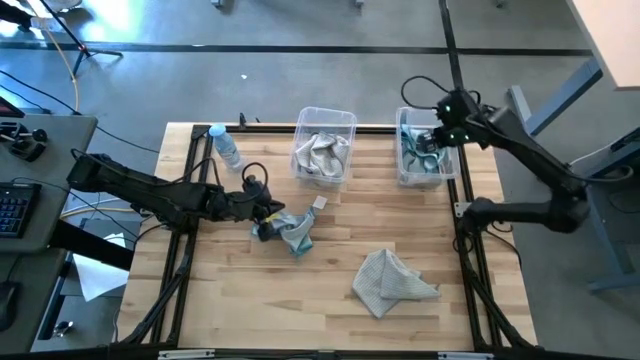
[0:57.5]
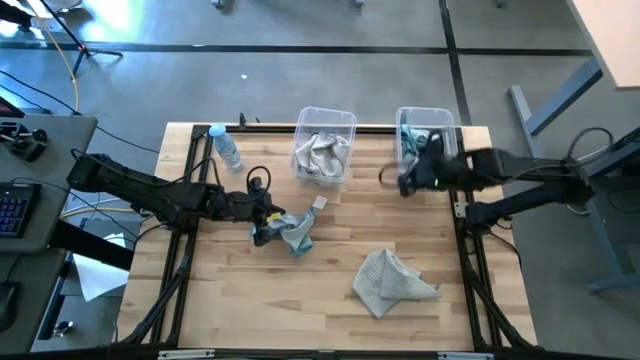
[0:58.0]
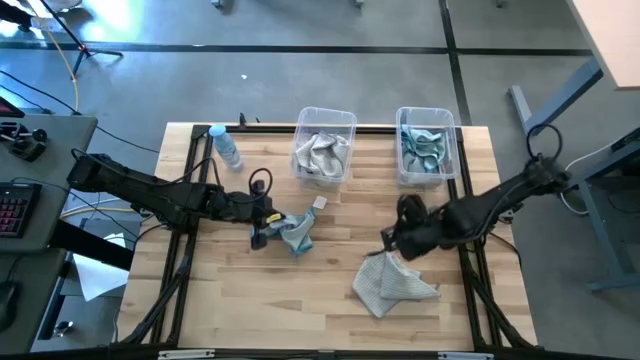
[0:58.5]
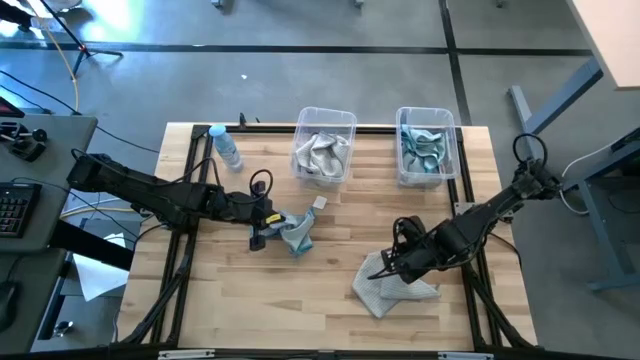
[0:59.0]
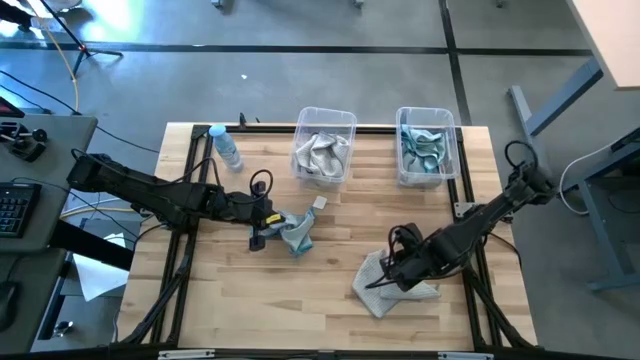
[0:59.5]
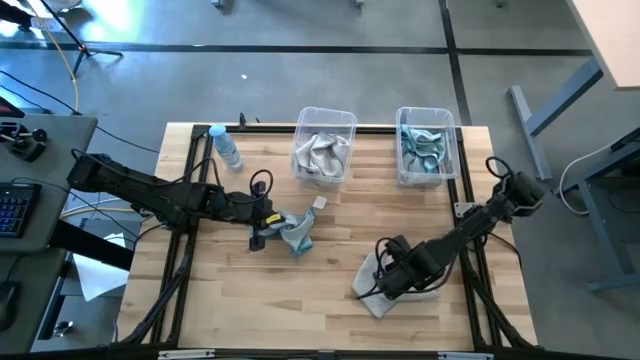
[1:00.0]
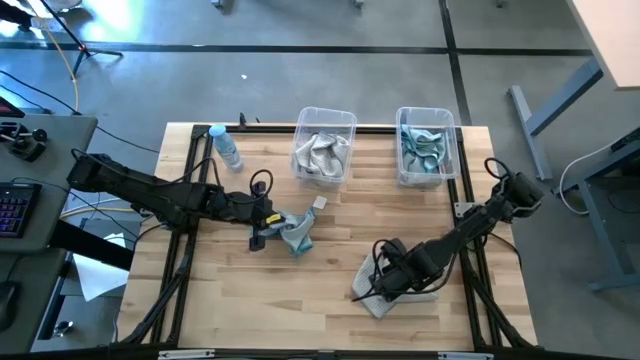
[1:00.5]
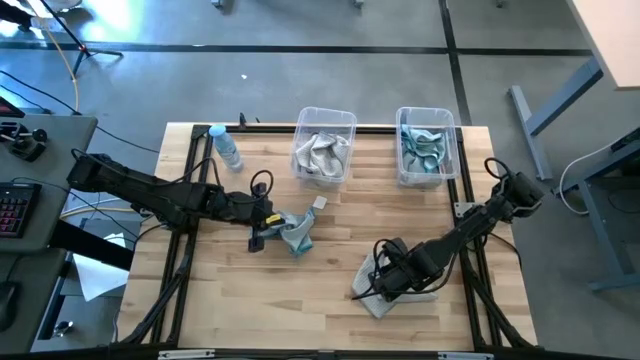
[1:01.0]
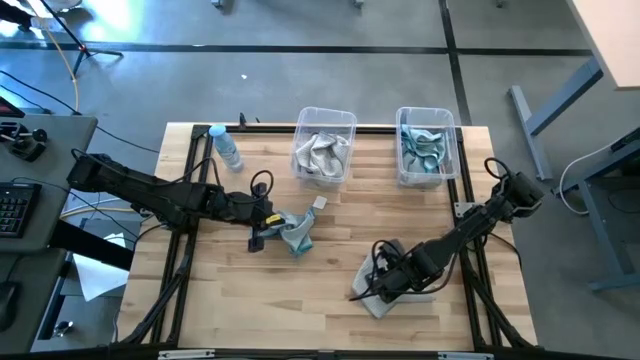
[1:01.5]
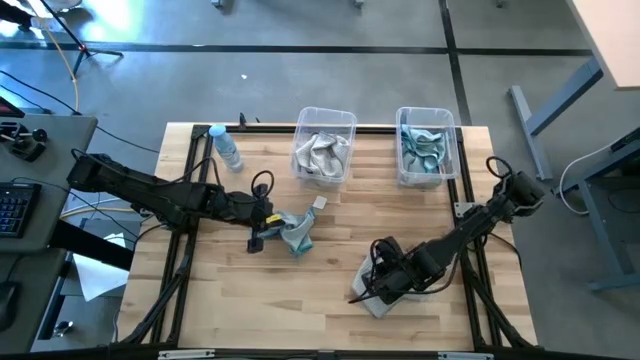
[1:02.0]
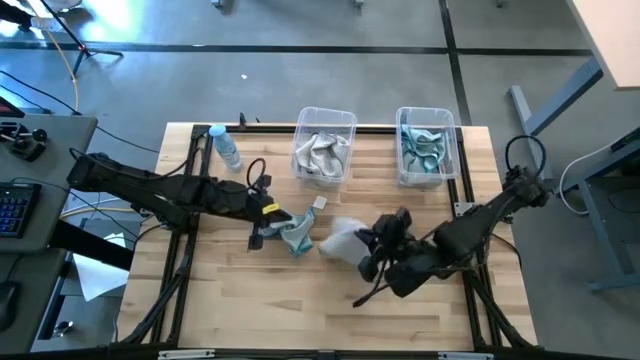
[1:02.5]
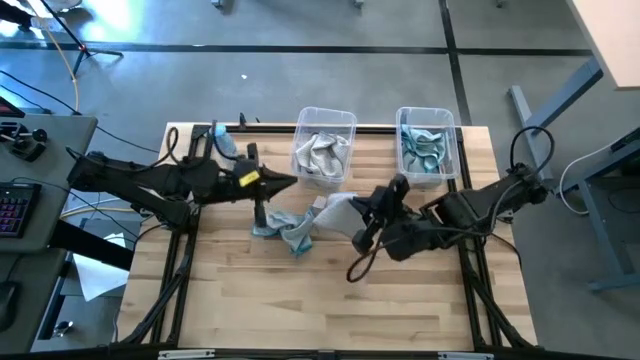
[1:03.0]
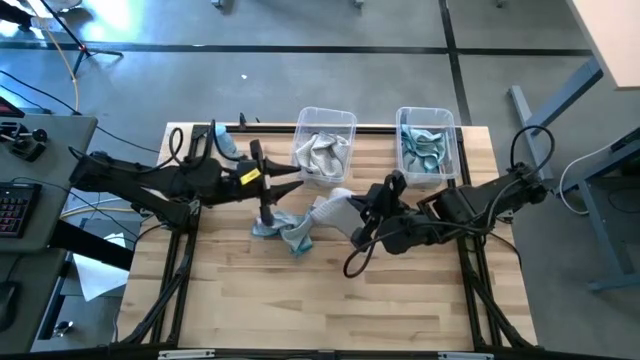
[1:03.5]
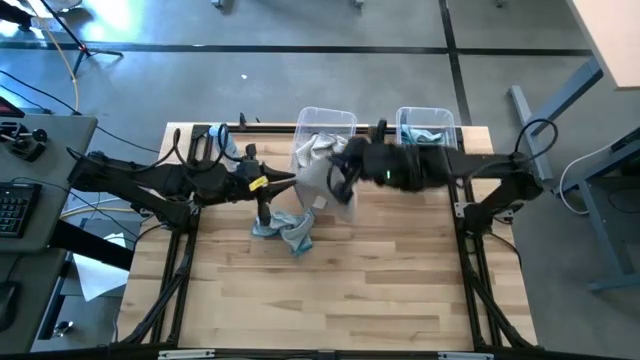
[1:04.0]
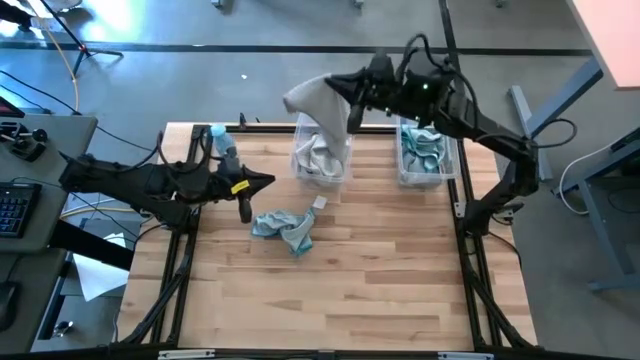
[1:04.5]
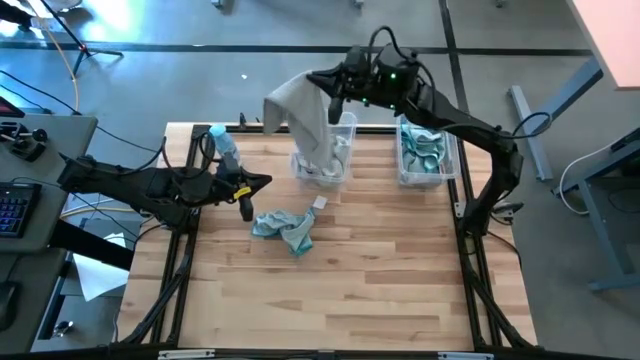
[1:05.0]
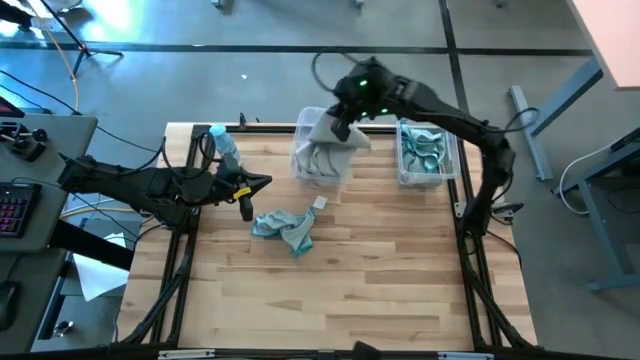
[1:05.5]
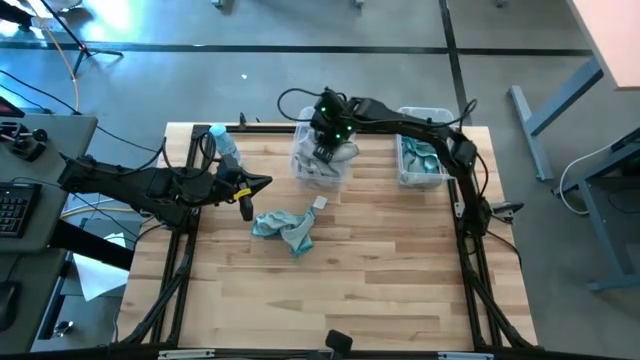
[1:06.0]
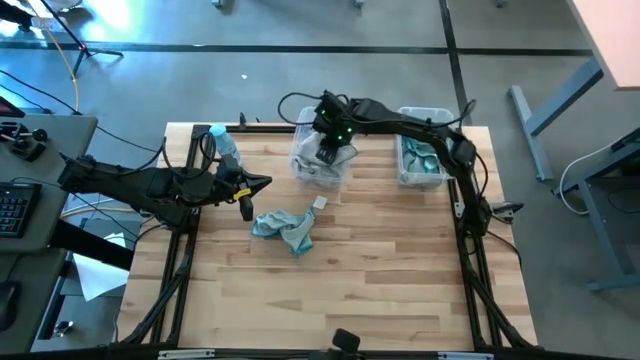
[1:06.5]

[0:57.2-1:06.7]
Task: Sort microfiber towel by color & place in baskets
Put the white microfiber cloth into the left transparent bin

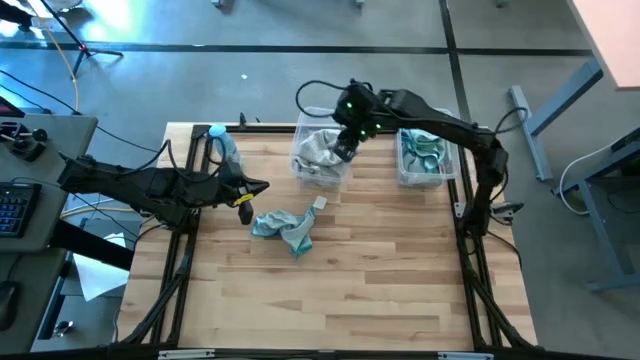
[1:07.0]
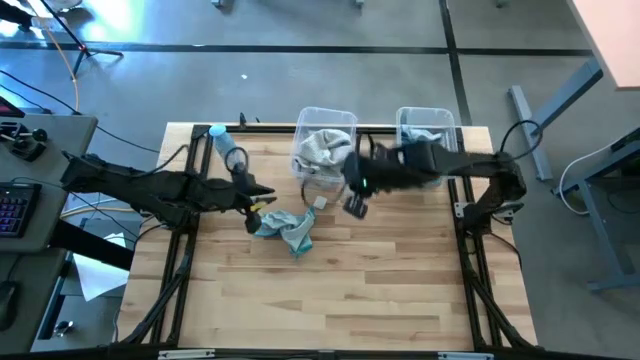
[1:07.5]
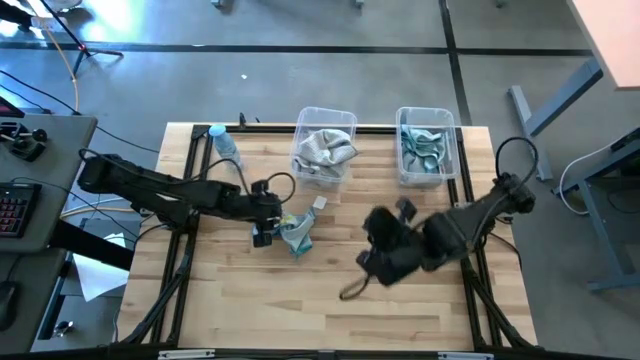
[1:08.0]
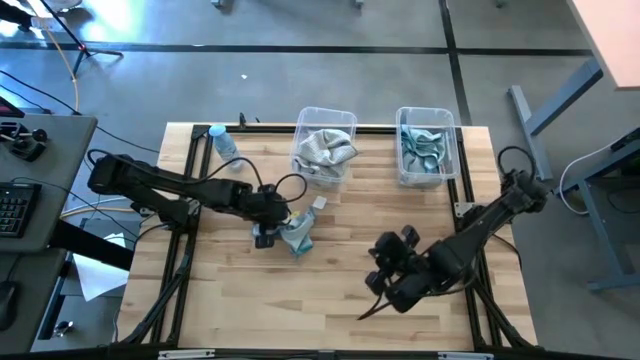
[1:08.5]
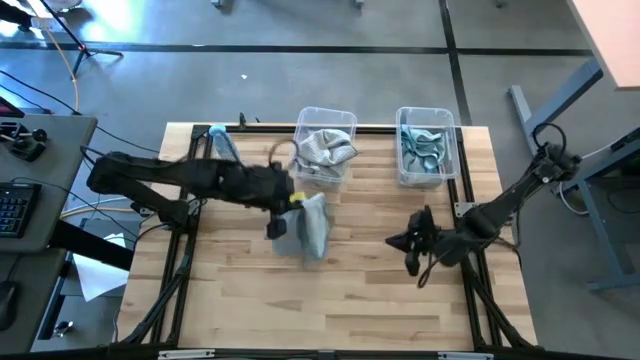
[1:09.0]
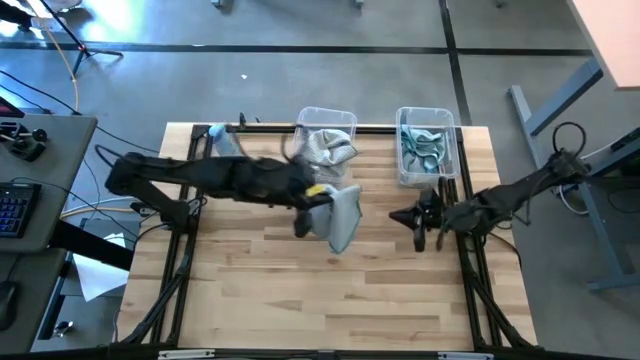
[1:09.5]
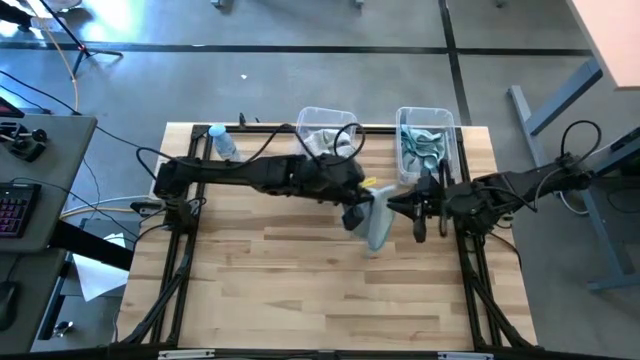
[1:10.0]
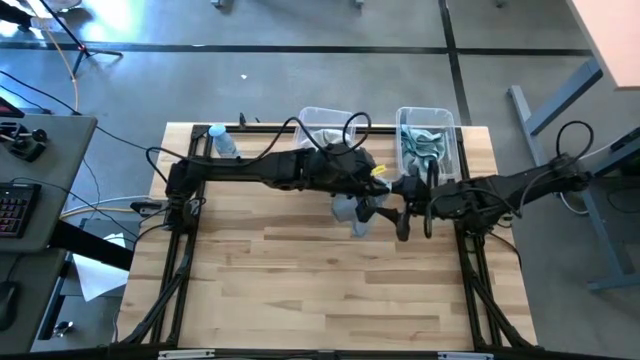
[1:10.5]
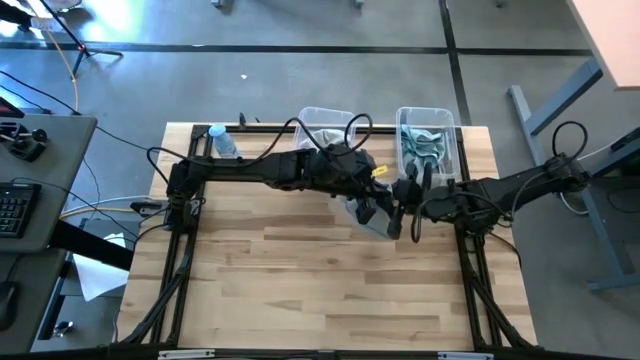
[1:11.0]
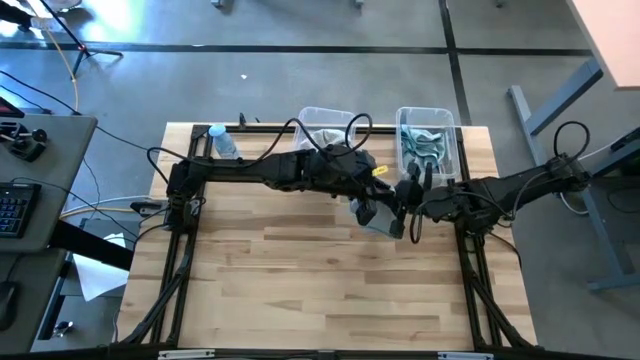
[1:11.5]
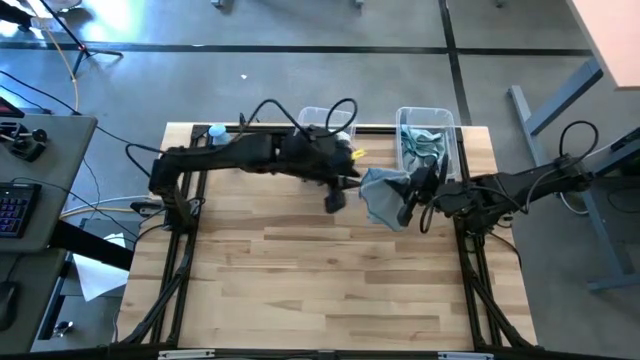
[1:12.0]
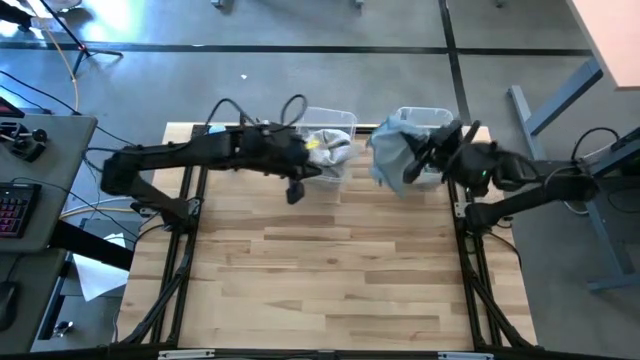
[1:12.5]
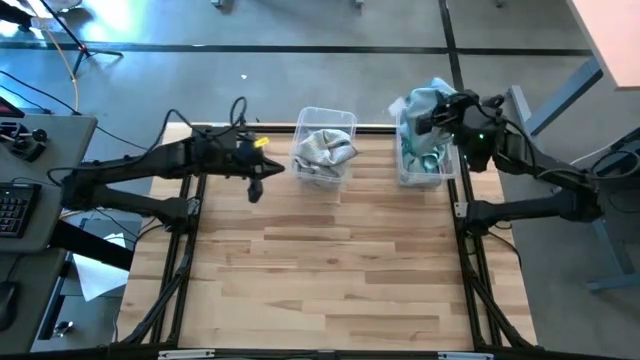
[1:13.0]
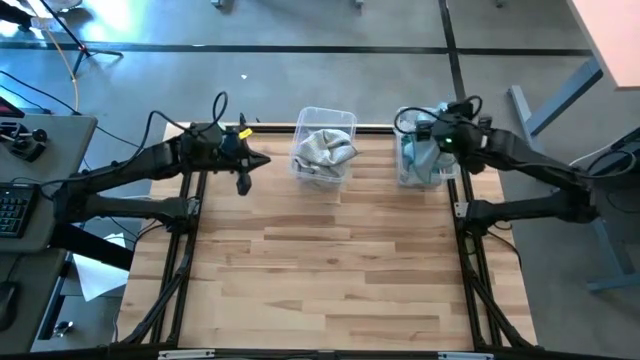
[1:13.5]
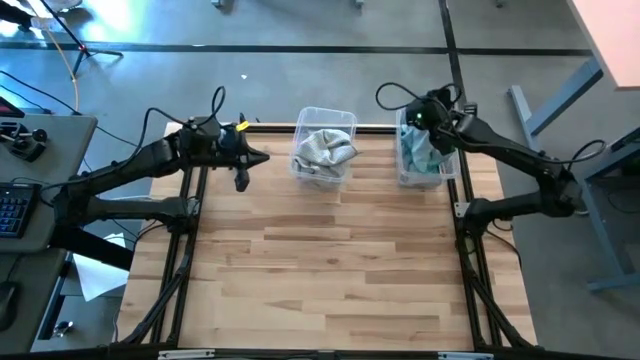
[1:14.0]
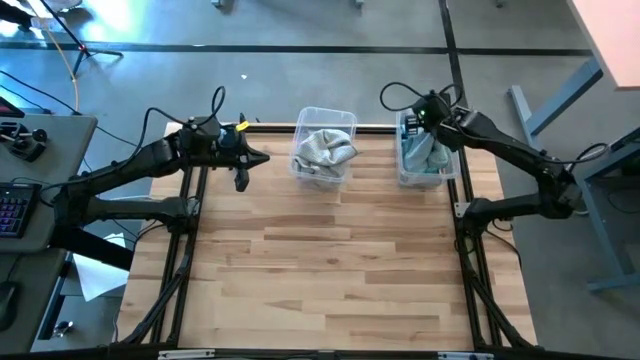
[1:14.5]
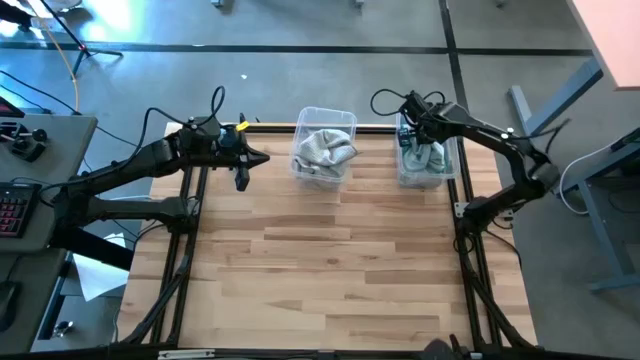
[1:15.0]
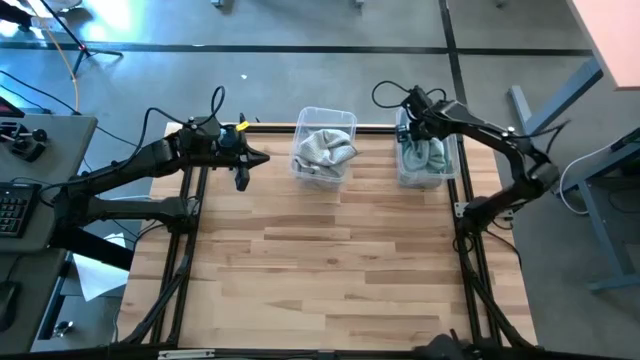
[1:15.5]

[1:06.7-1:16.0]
Put the light blue microfiber cloth into the right transparent bin

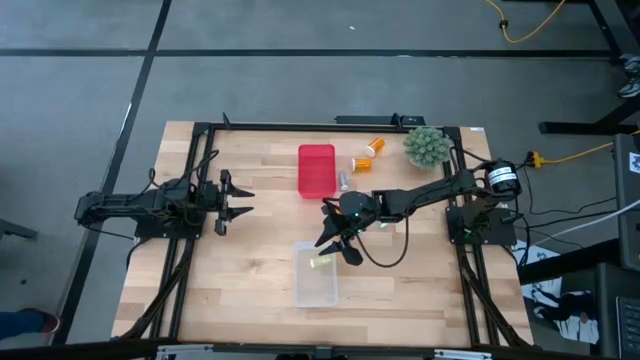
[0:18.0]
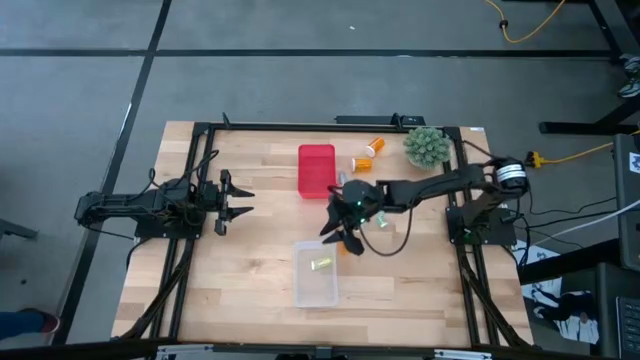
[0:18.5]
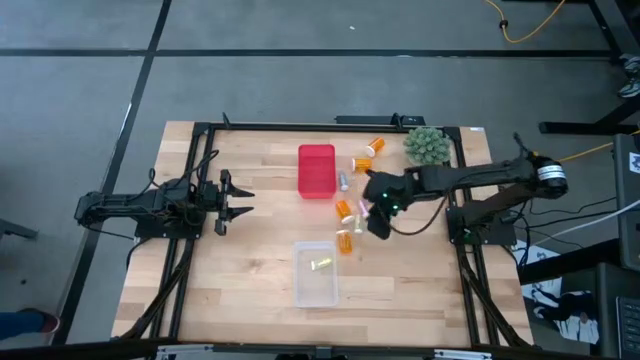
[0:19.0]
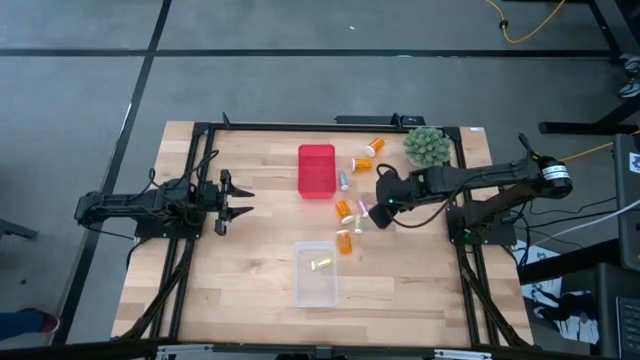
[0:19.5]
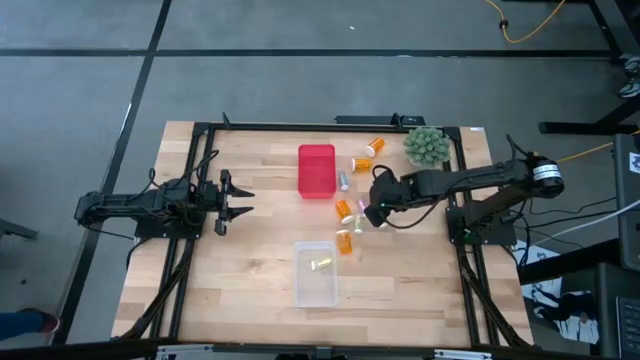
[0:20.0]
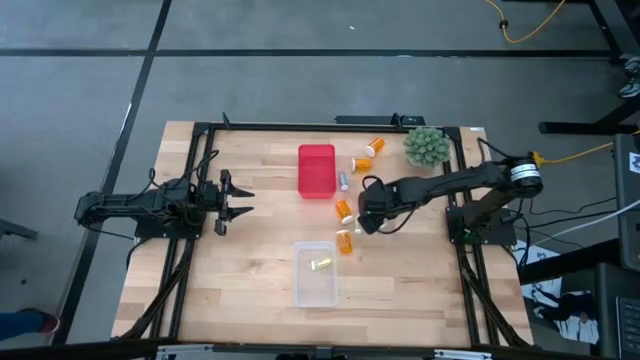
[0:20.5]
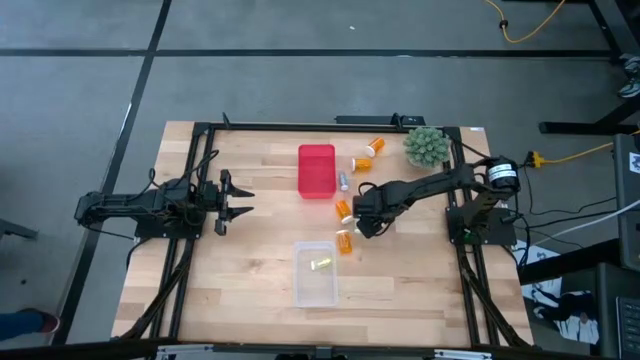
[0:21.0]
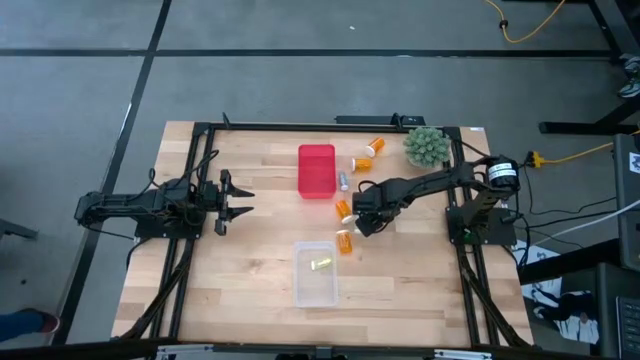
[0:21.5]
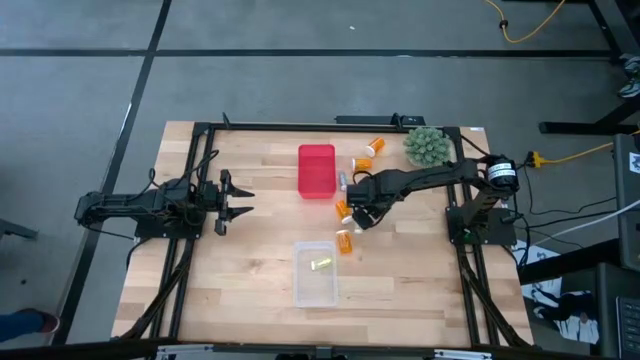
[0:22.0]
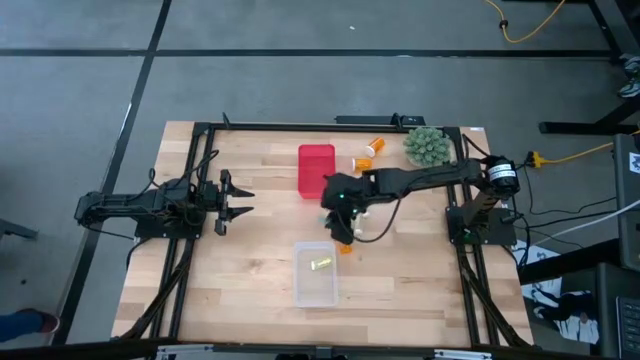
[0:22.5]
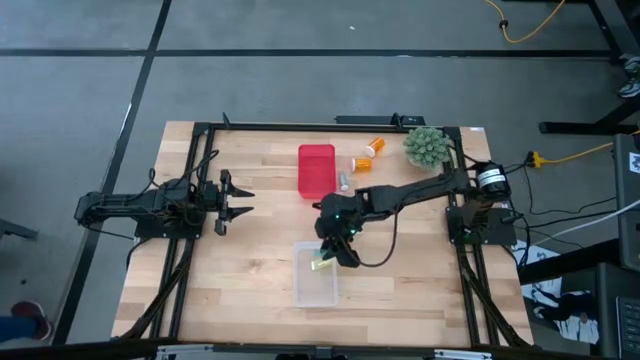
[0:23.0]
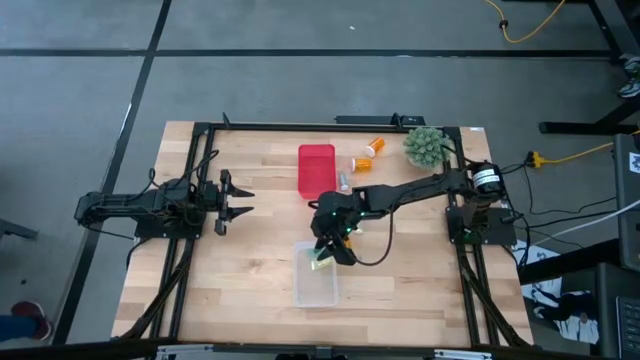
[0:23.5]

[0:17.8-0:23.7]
Task: Pick and place medicine bottles into bin by pill shape (circle, oval)
Put the small blue pill bottle into the transparent bin
